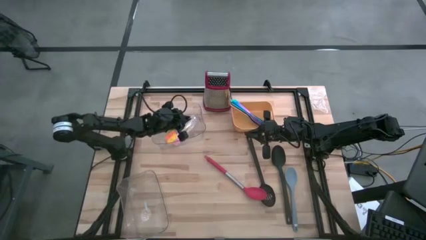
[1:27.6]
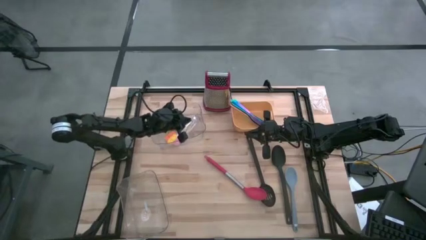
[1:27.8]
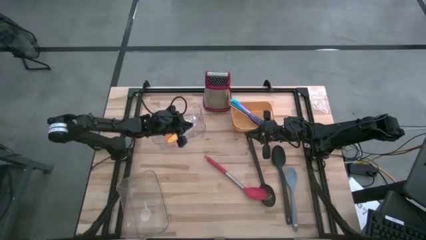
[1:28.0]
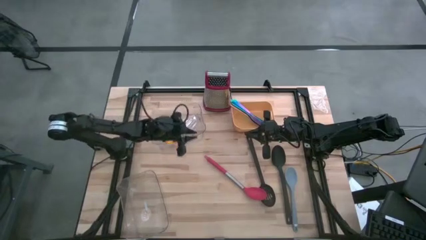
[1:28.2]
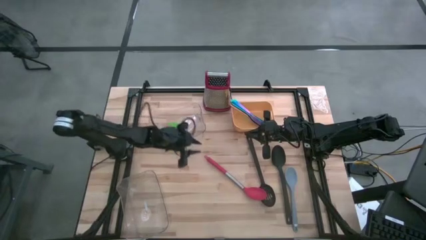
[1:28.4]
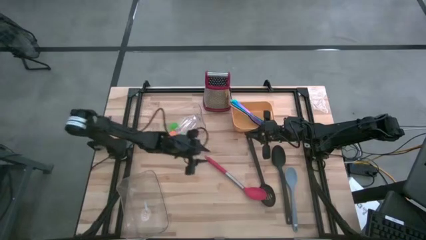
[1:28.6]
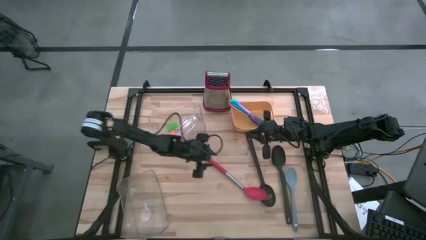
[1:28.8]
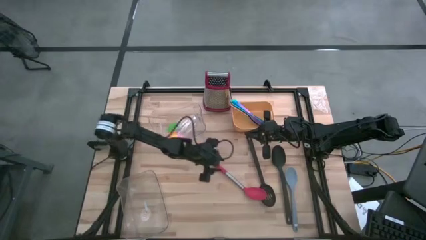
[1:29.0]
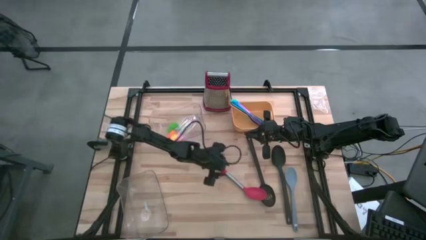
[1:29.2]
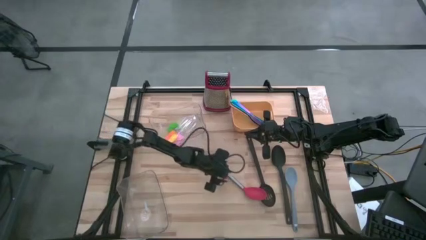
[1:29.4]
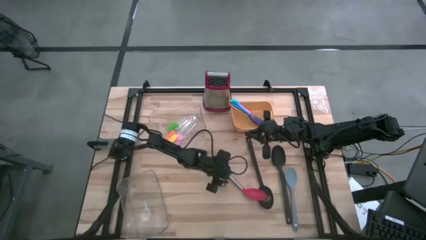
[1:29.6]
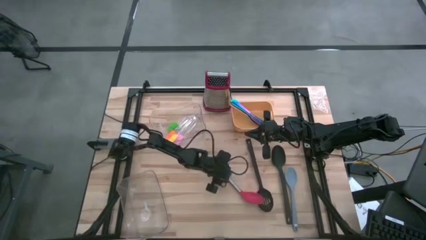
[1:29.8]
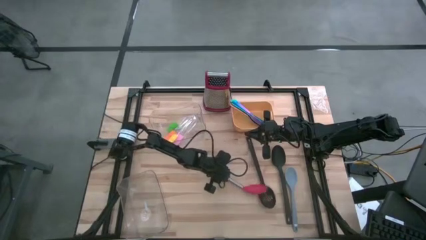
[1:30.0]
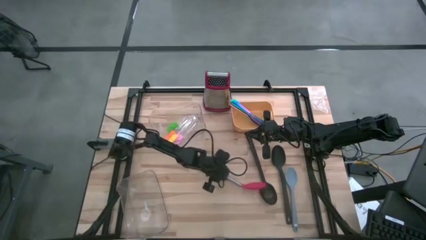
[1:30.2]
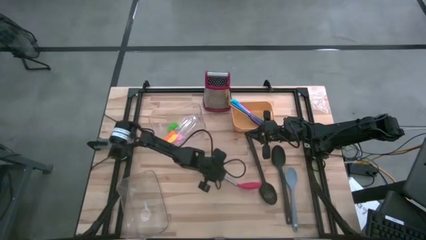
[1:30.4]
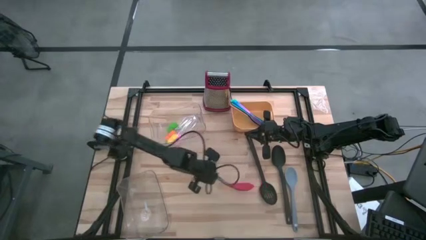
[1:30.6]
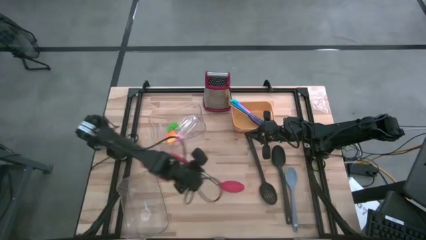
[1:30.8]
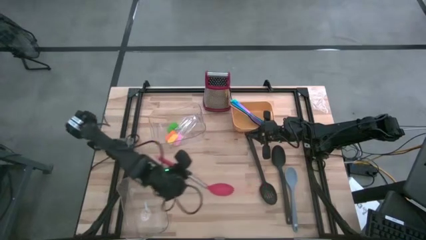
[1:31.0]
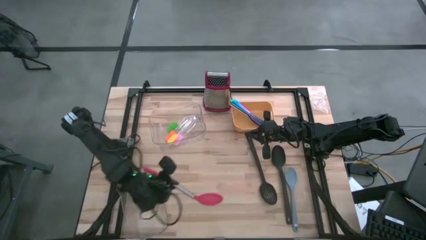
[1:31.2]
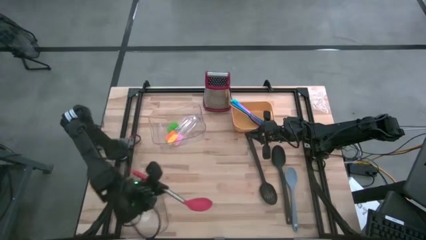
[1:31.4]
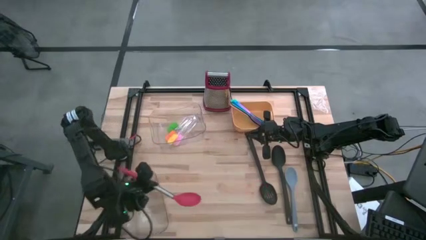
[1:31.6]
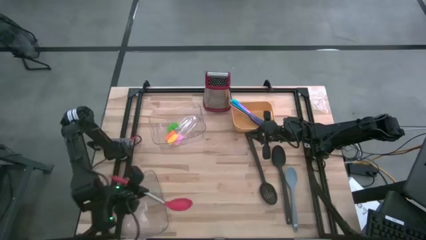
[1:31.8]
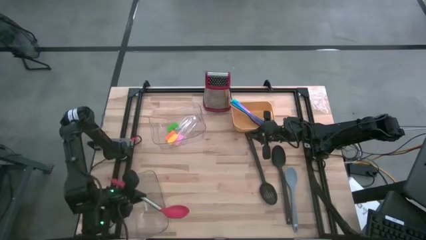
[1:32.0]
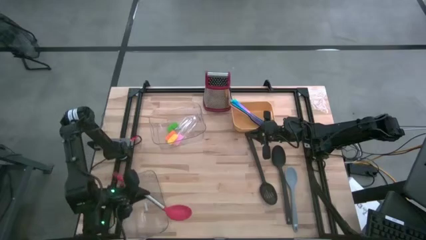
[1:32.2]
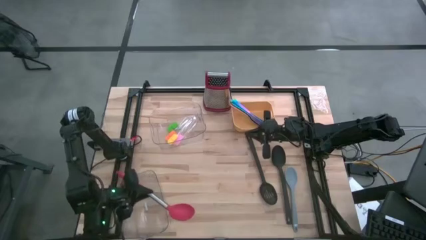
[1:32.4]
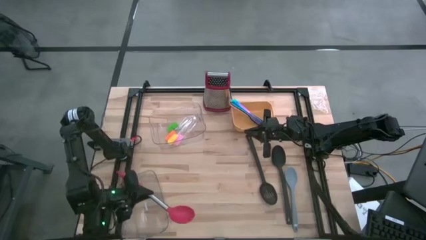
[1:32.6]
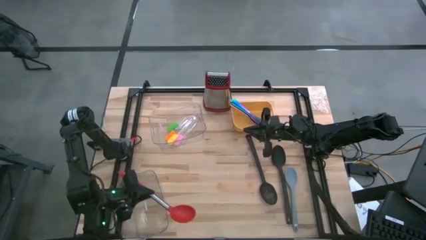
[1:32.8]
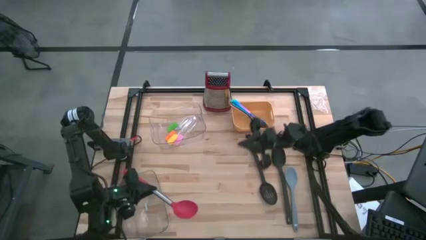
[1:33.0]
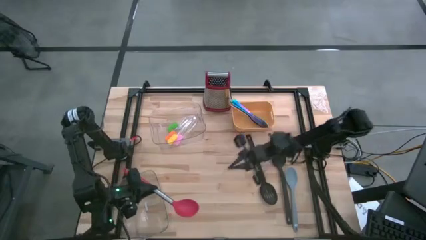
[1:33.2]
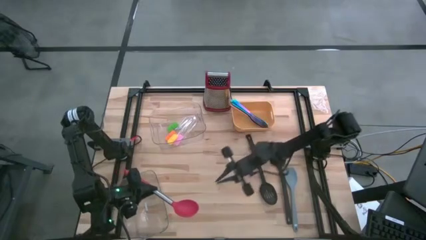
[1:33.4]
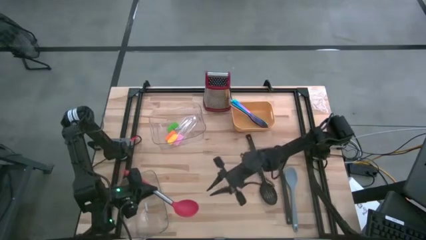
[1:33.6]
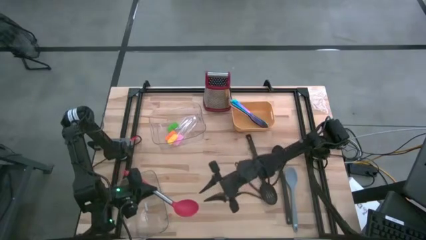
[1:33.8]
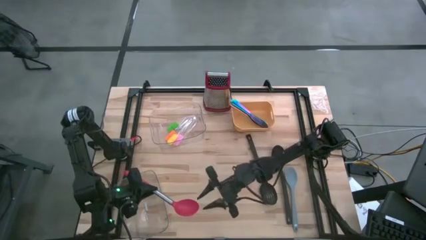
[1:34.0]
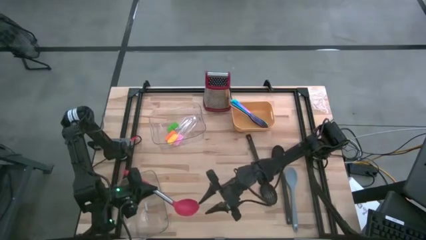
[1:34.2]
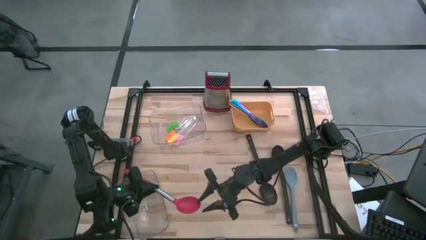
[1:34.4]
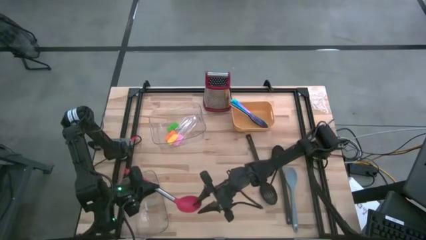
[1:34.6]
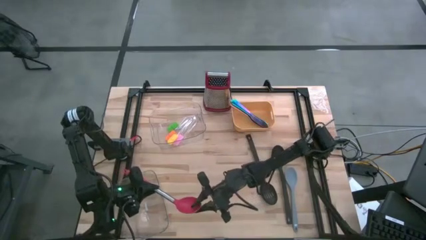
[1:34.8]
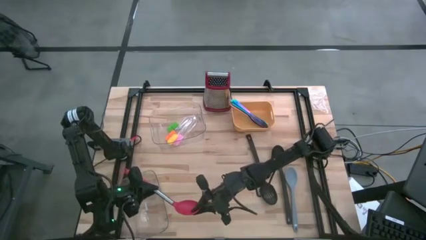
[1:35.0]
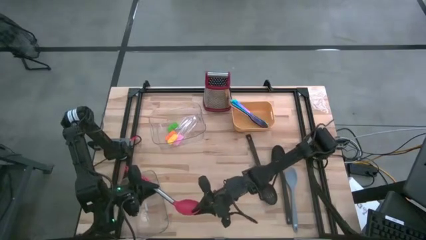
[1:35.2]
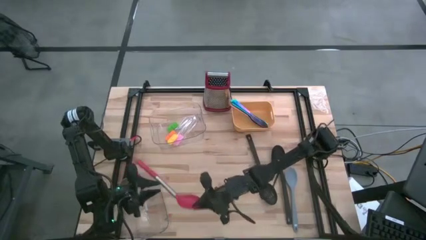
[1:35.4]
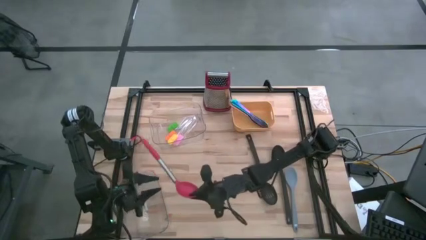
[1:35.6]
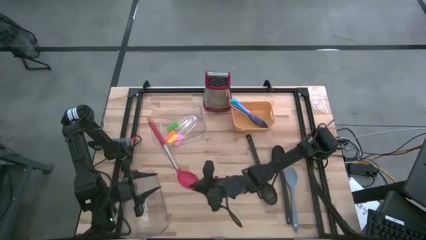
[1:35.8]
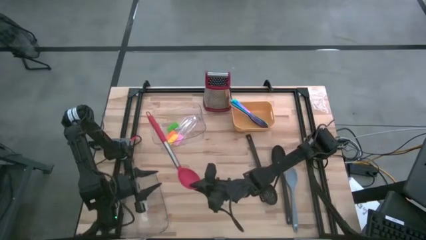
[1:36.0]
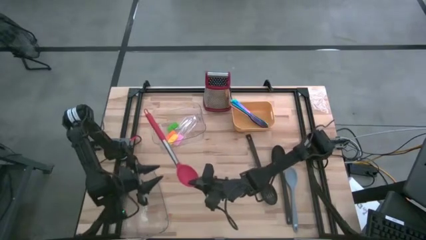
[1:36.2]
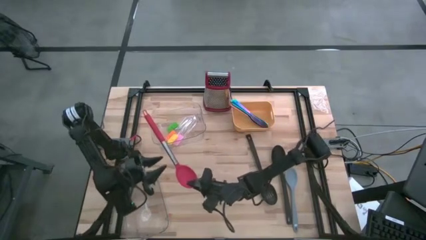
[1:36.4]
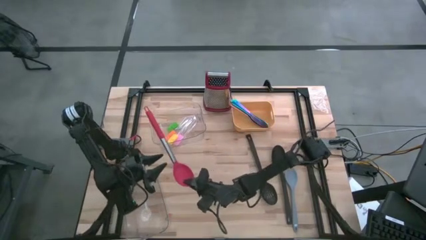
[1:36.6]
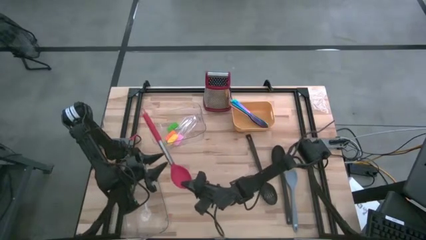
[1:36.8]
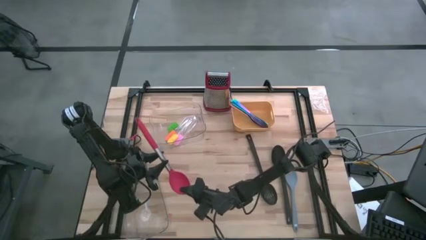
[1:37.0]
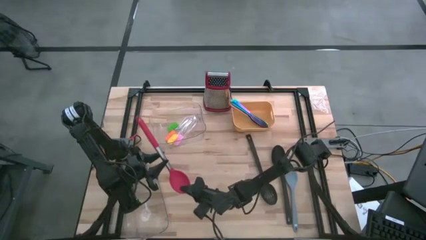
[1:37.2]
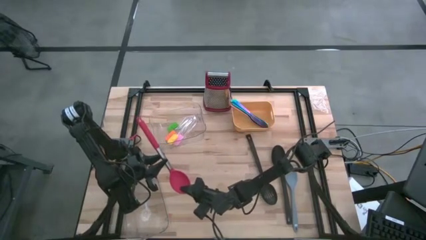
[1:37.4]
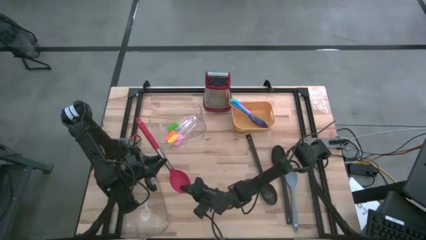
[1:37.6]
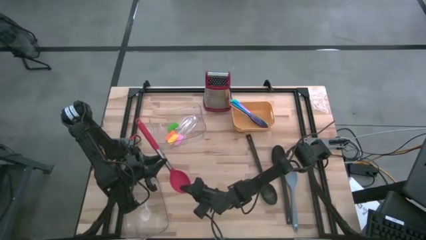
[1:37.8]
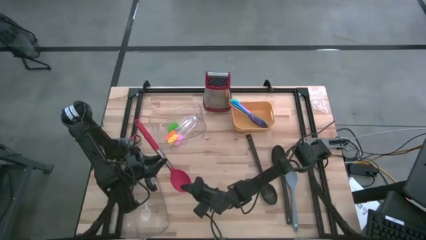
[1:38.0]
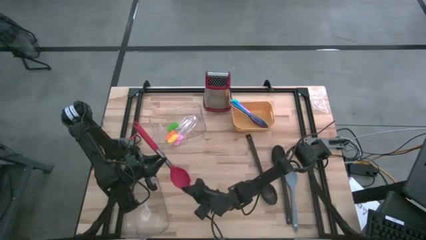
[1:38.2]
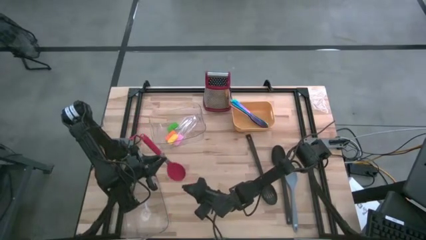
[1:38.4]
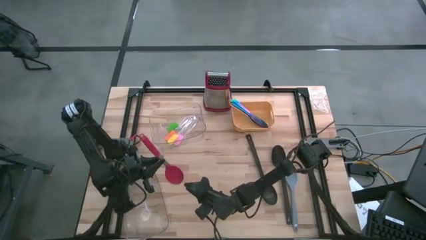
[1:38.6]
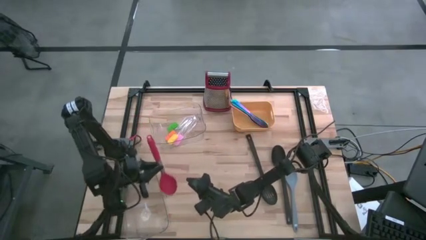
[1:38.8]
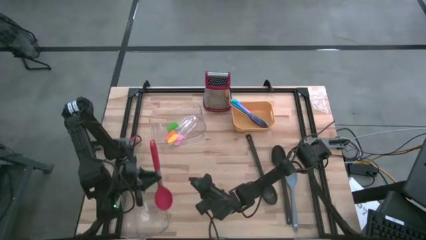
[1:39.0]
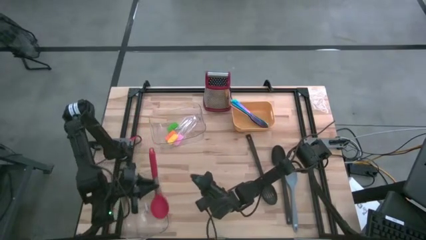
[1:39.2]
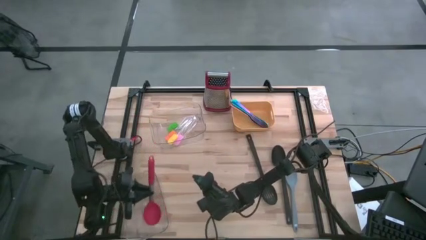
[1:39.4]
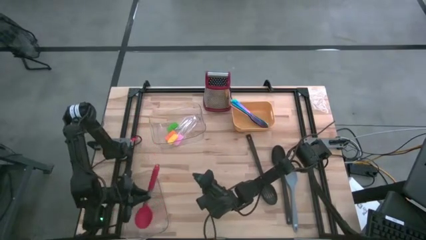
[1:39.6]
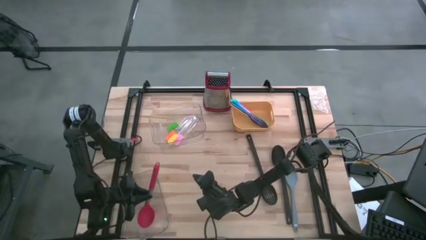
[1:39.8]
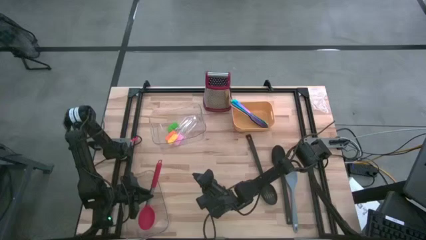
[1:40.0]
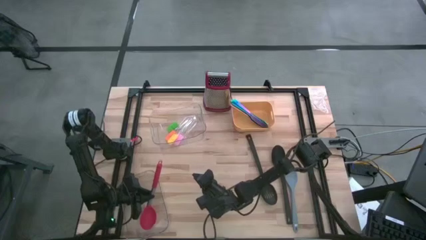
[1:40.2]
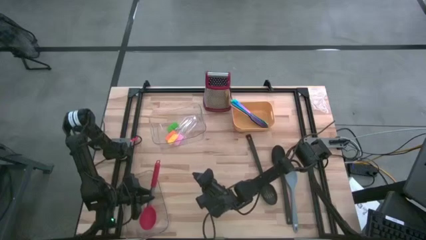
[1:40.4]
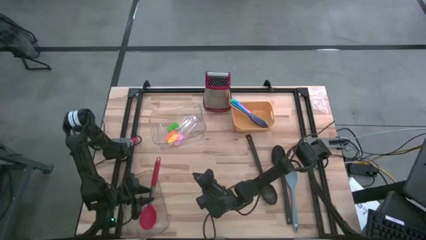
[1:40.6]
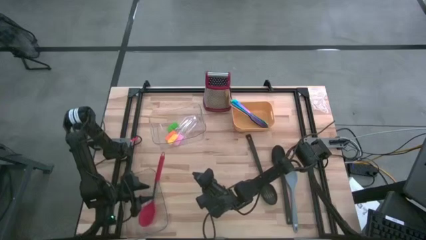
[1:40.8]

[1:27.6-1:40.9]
Task: Pick & Place Kitchen Items
Put the red serving spoon into the bottom transparent bin
